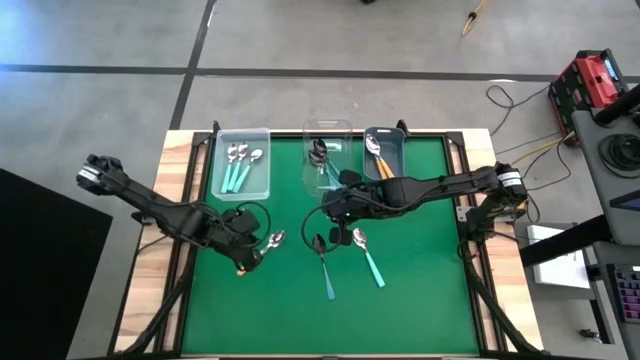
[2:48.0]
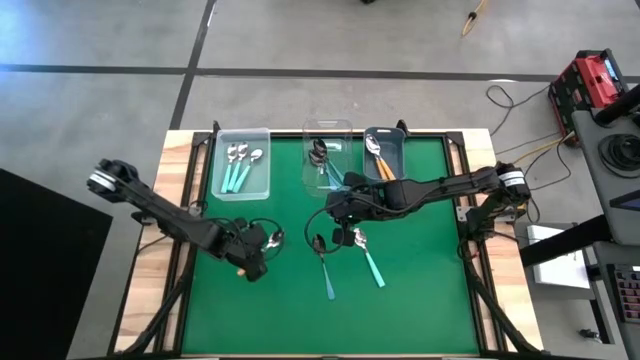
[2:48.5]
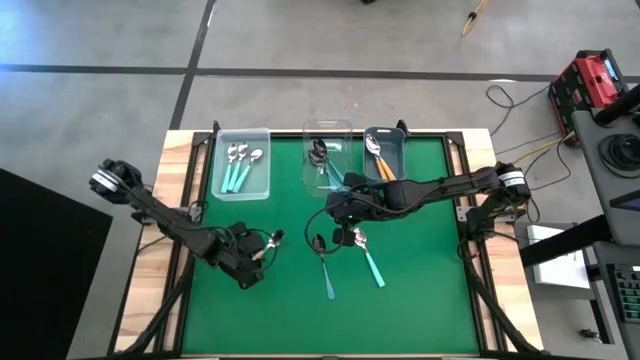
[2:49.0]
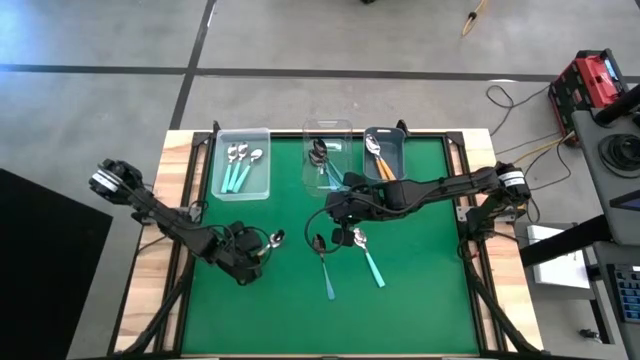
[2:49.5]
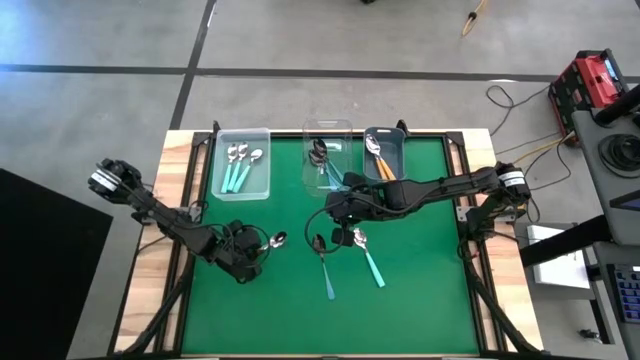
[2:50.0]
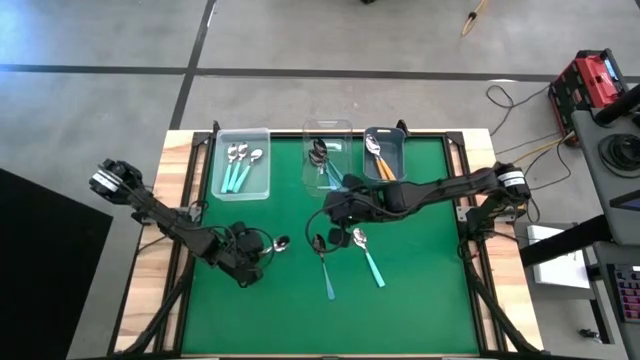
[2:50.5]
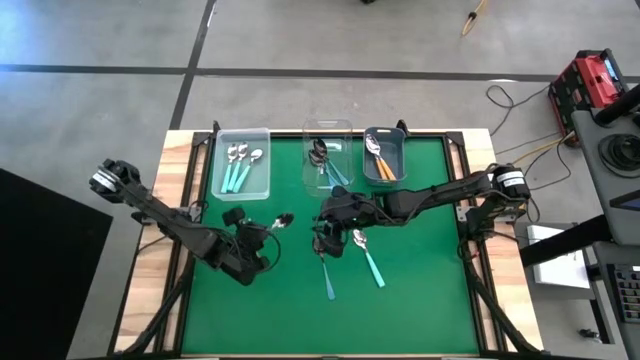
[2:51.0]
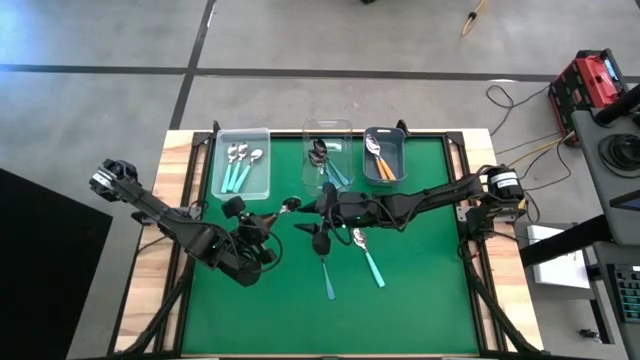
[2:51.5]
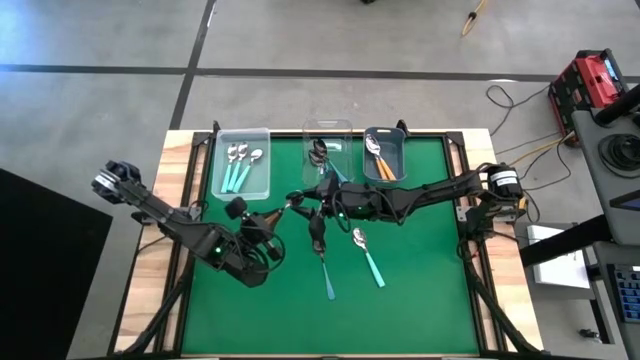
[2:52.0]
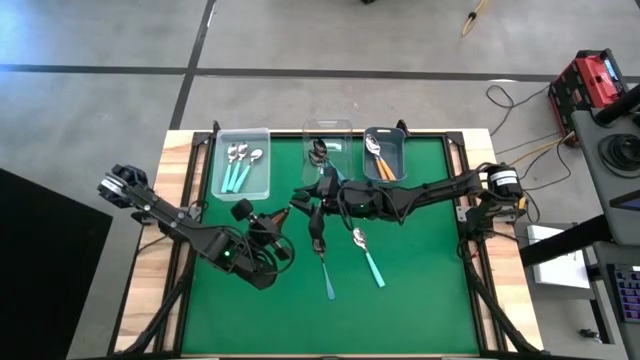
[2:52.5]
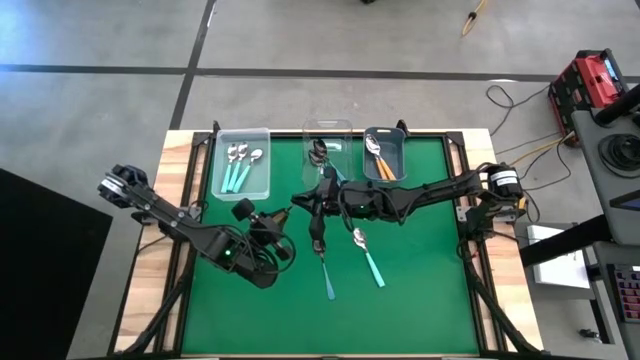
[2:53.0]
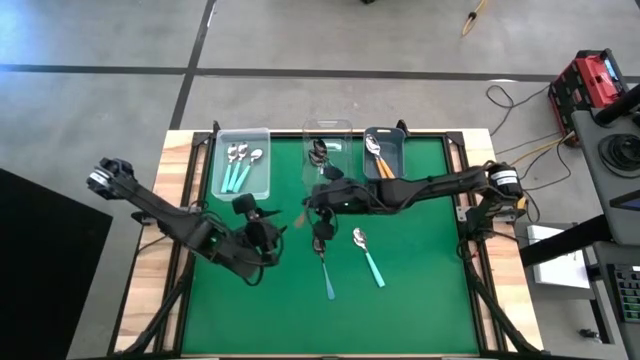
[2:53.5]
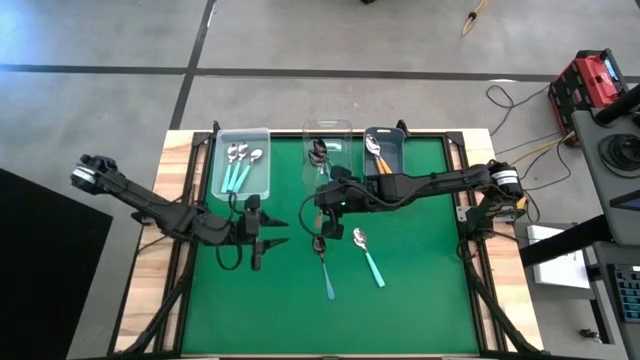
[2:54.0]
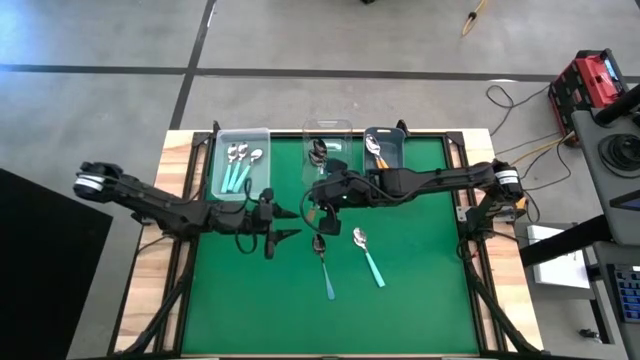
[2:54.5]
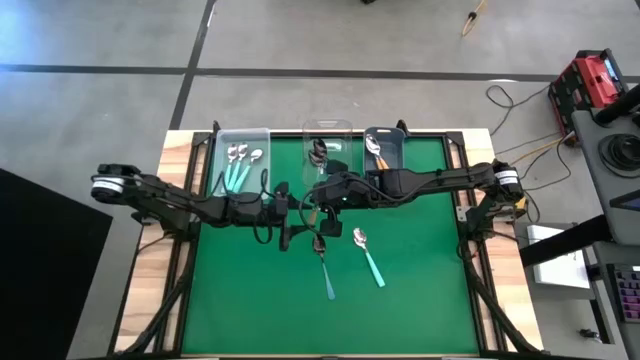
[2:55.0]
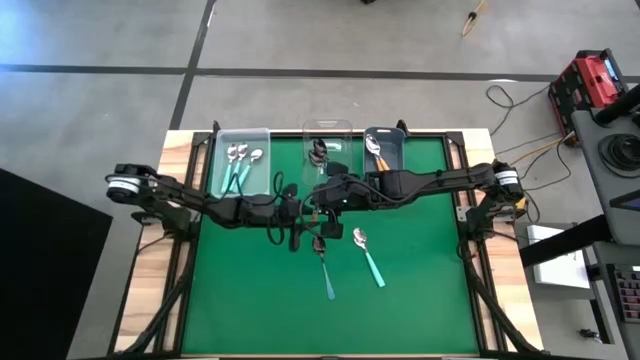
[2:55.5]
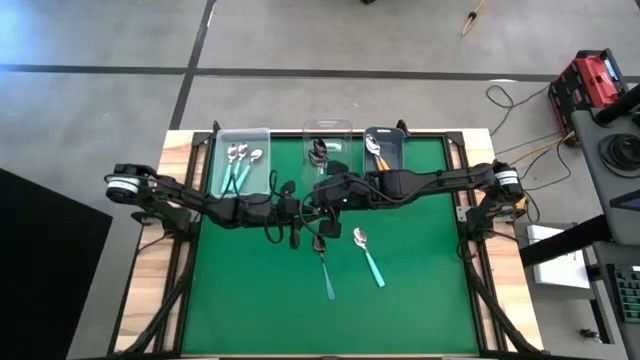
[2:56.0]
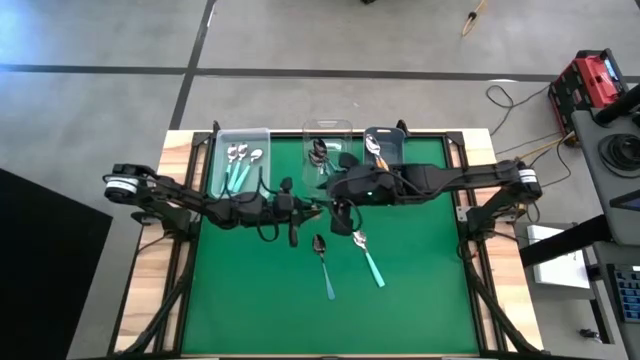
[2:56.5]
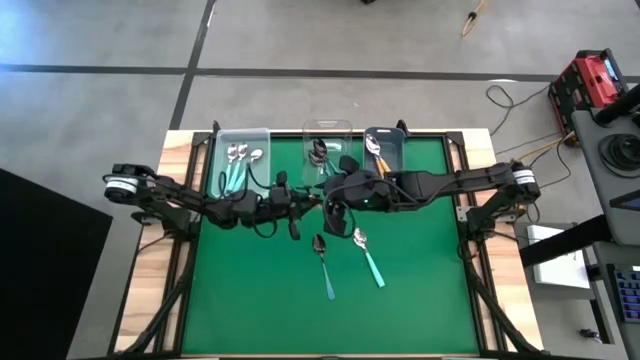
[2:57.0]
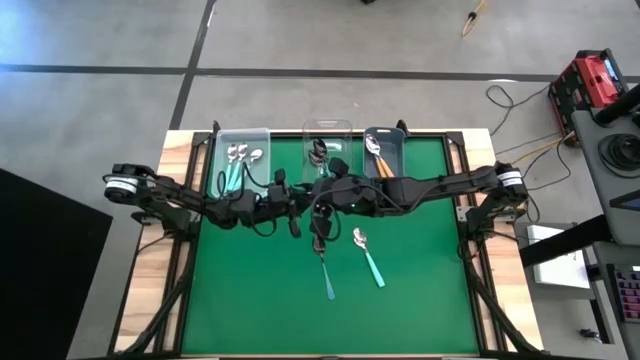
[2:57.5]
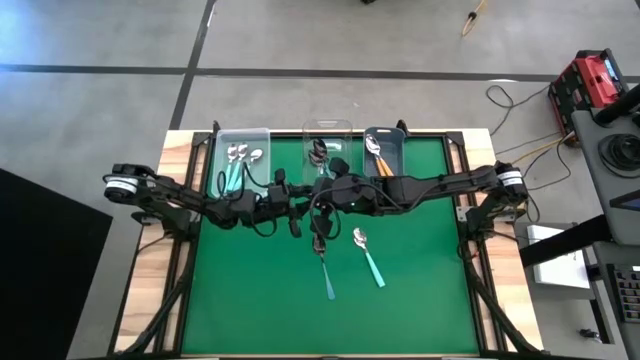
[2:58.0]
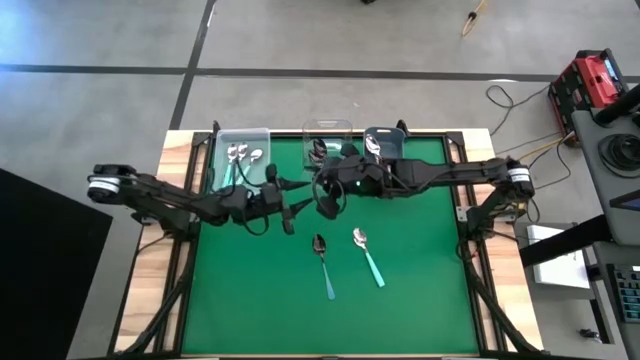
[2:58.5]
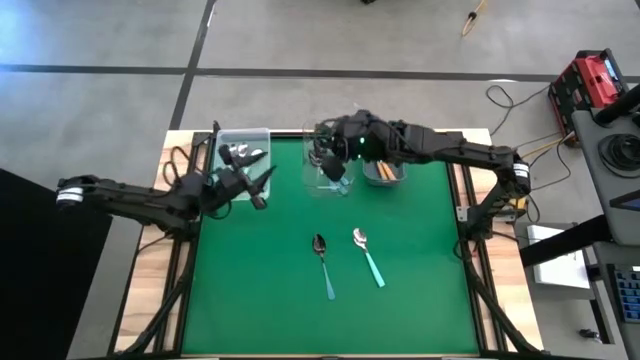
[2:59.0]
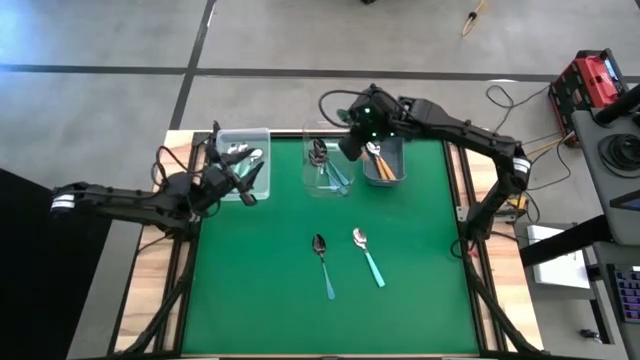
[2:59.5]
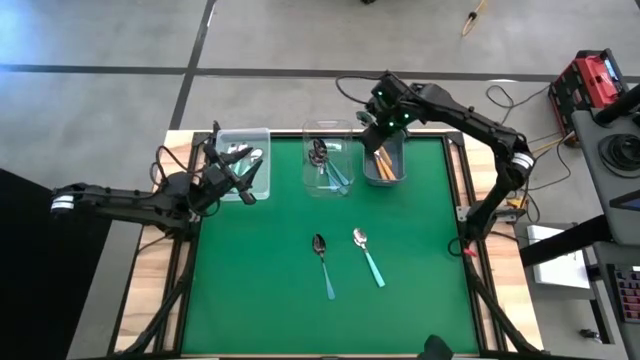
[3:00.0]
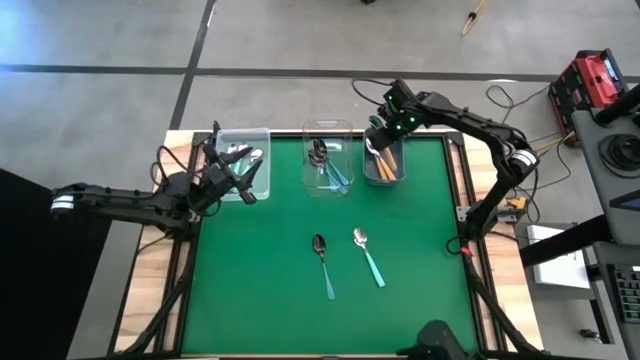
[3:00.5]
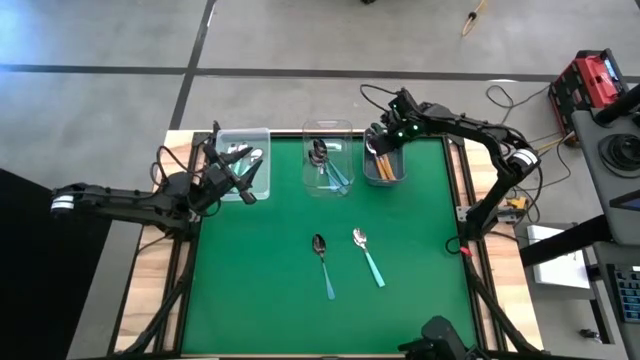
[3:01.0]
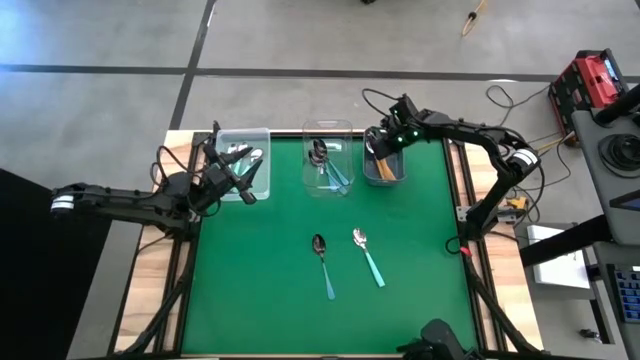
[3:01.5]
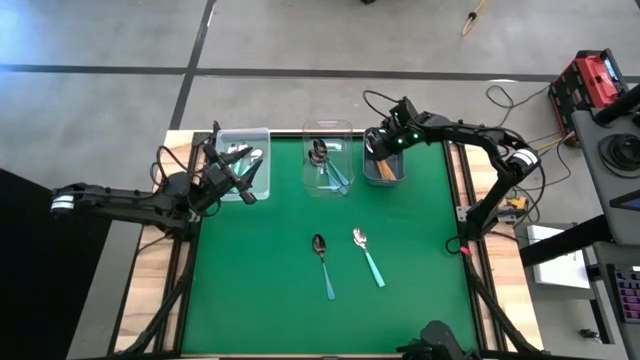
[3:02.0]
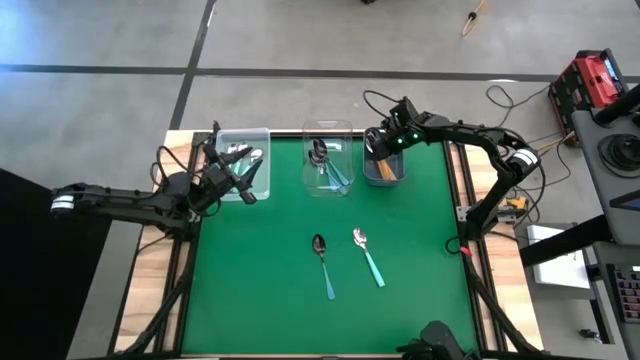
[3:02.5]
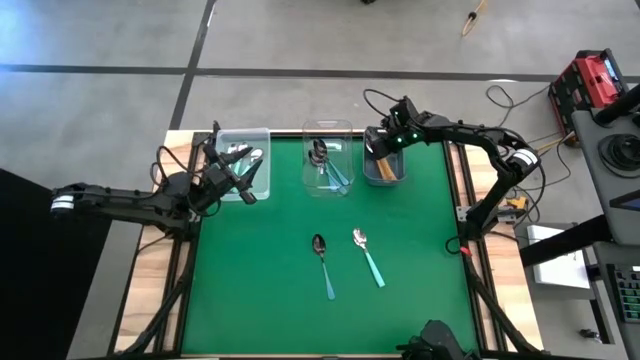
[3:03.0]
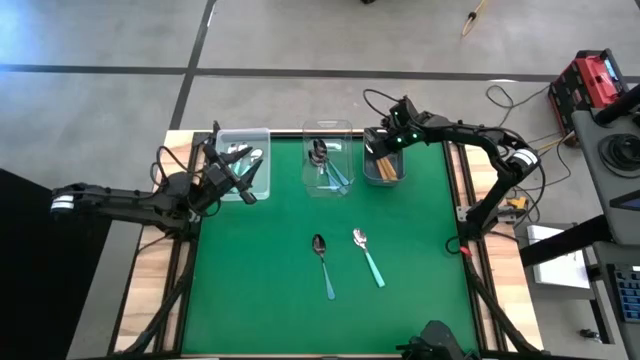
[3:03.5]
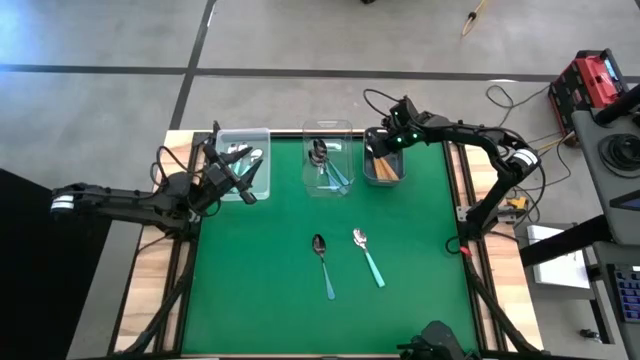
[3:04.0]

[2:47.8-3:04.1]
Task: Sort silverware by color (type)
Put the yellow spoon into the blue bin

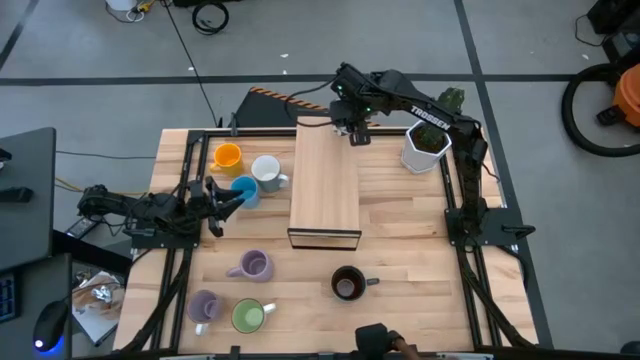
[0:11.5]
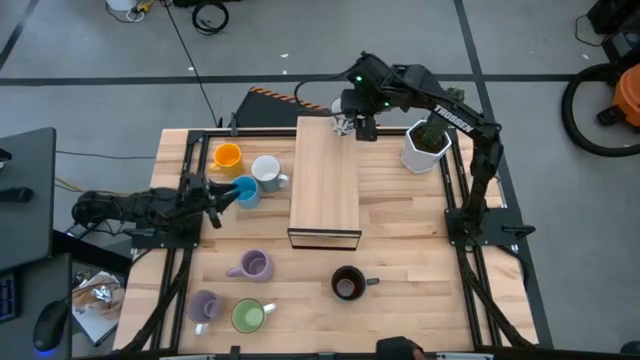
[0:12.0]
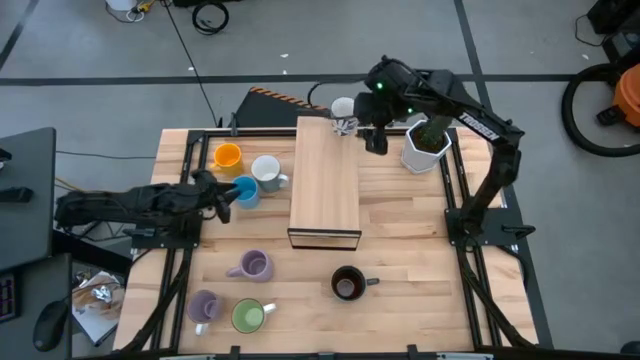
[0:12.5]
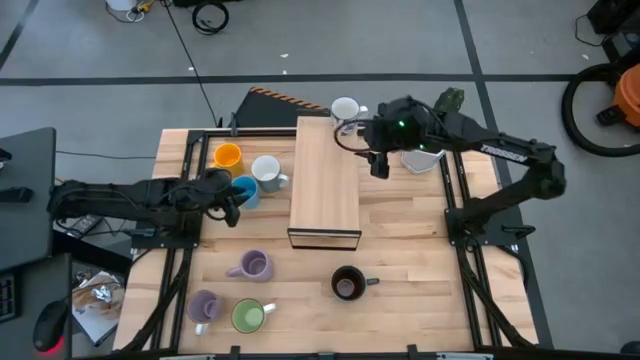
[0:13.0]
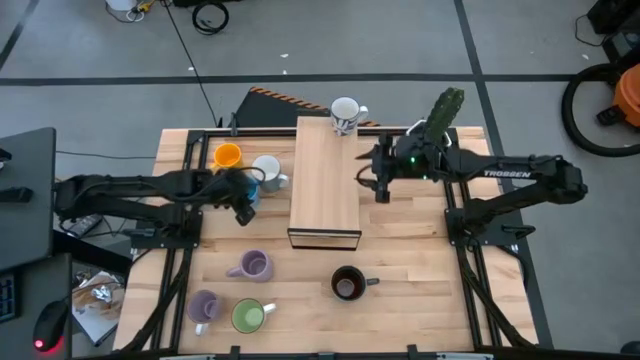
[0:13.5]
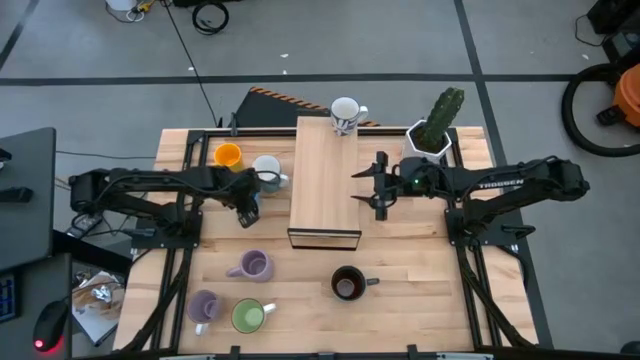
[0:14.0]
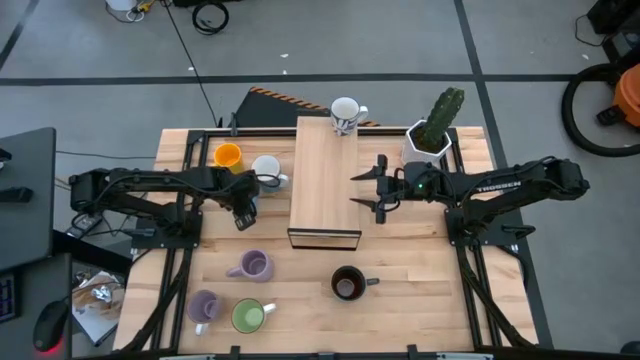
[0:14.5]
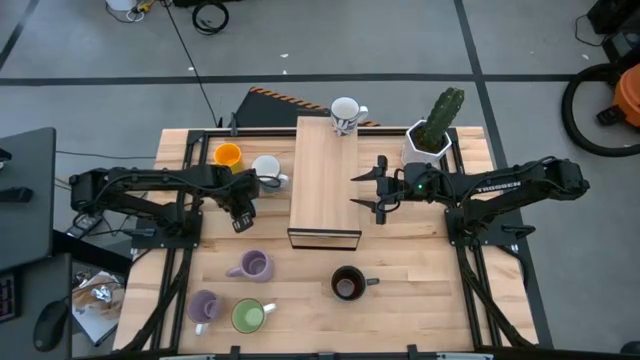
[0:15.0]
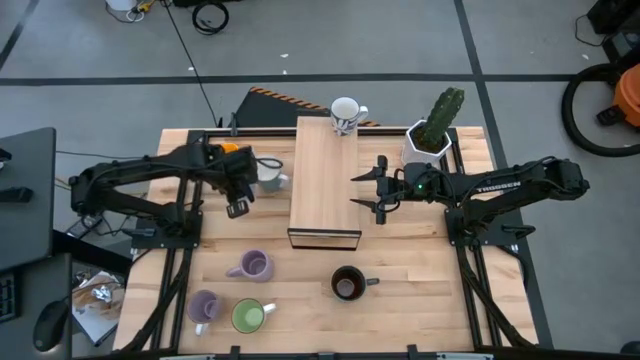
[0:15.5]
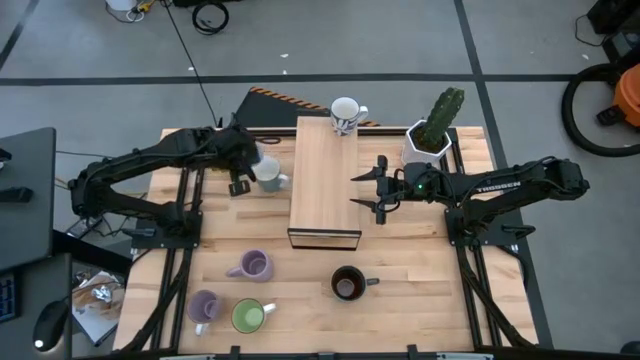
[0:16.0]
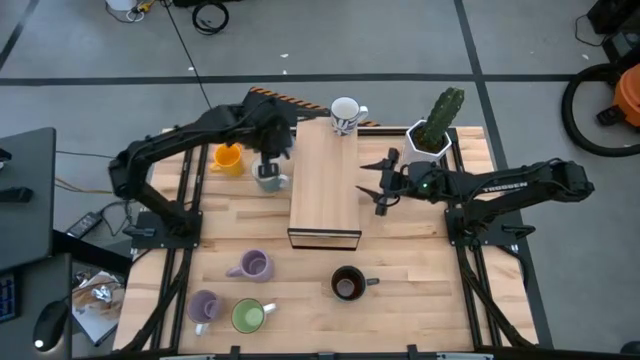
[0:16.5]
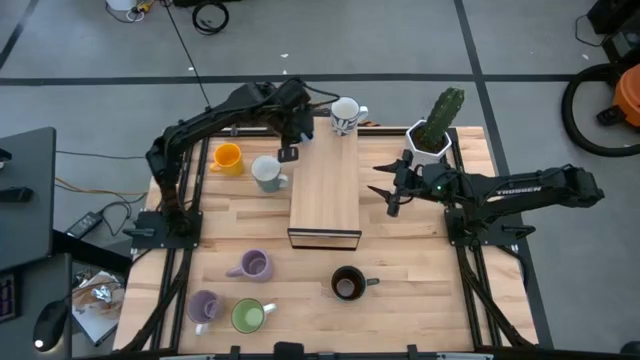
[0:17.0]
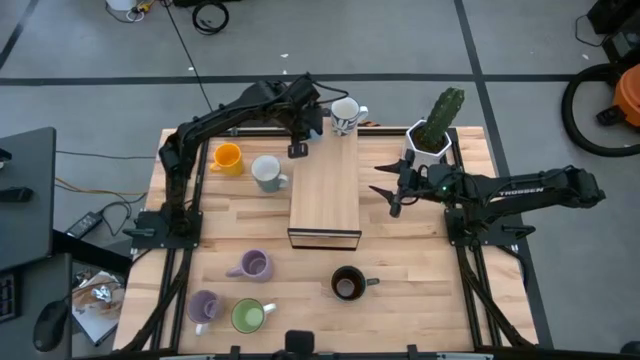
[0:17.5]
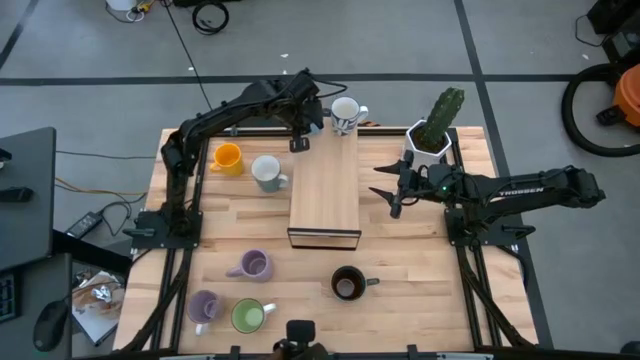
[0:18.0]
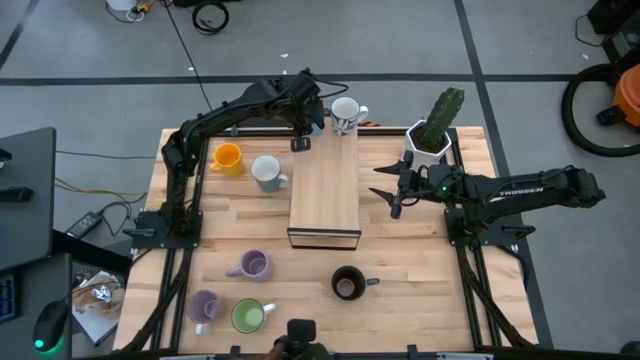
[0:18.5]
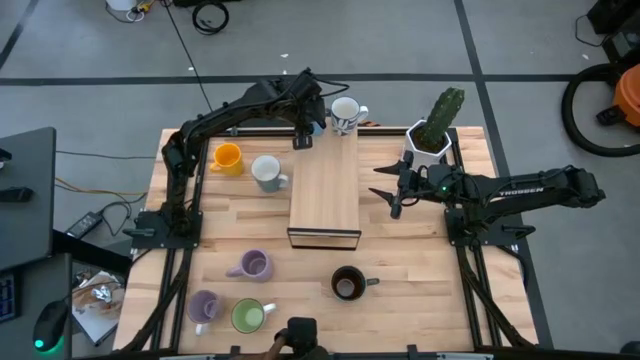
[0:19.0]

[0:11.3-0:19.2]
Task: Place coffee mugs
Put the blue mug on the shelf
